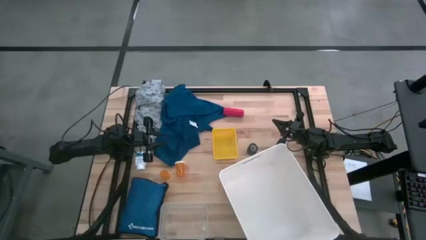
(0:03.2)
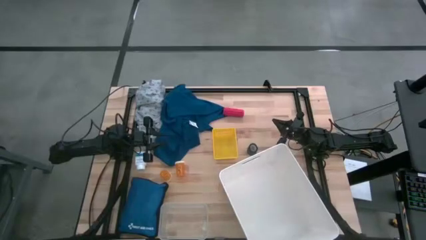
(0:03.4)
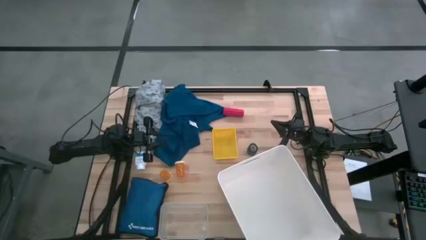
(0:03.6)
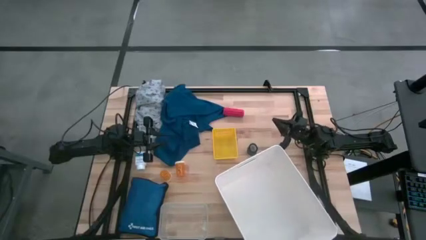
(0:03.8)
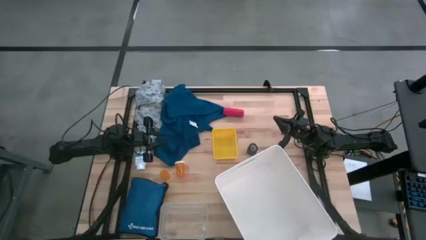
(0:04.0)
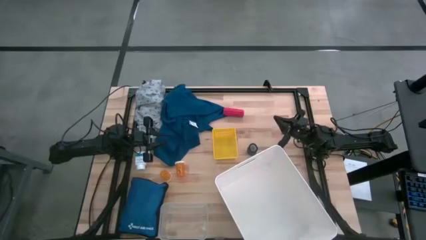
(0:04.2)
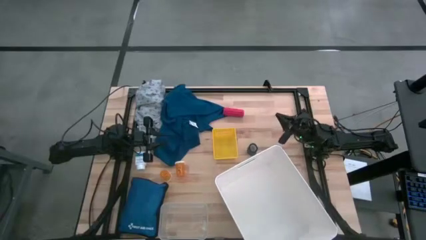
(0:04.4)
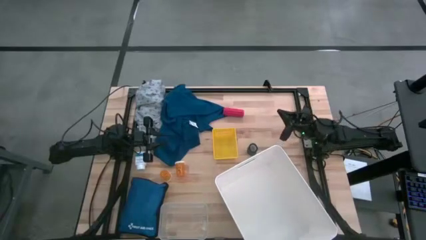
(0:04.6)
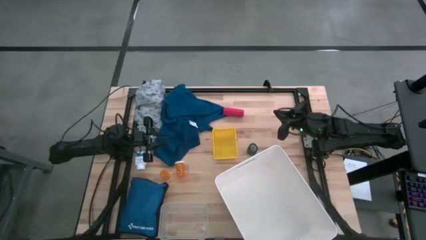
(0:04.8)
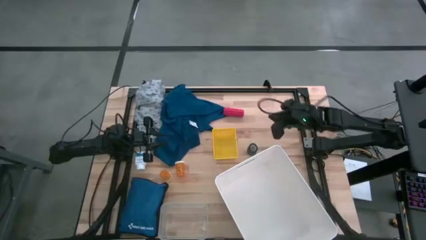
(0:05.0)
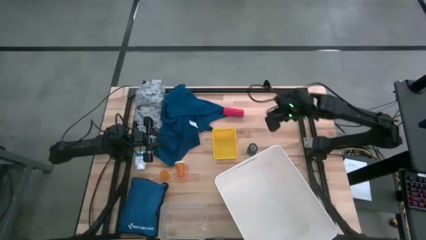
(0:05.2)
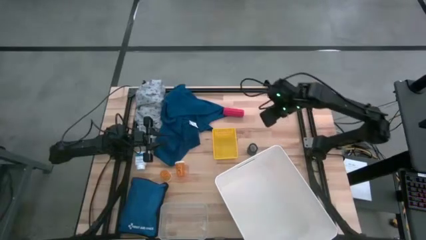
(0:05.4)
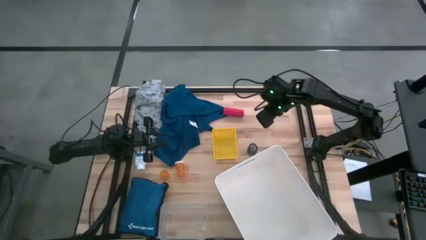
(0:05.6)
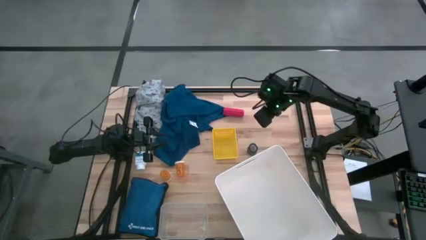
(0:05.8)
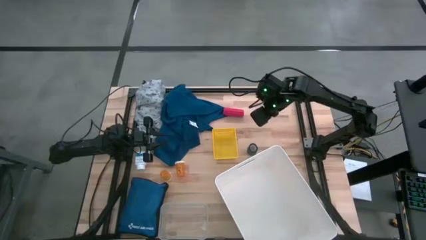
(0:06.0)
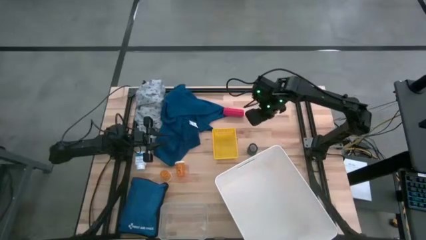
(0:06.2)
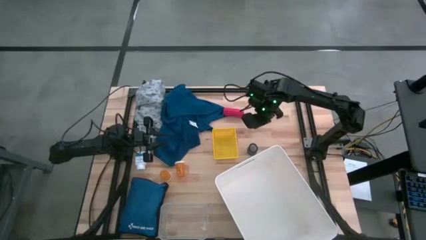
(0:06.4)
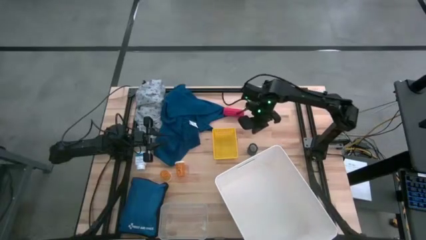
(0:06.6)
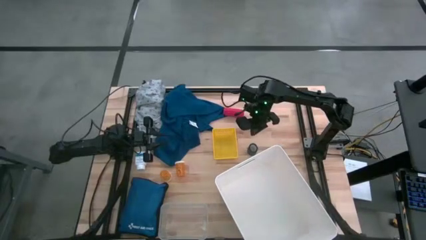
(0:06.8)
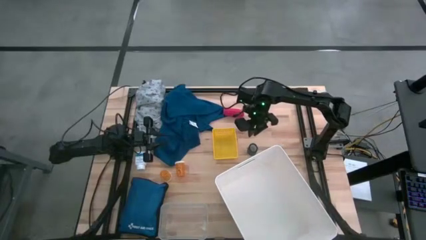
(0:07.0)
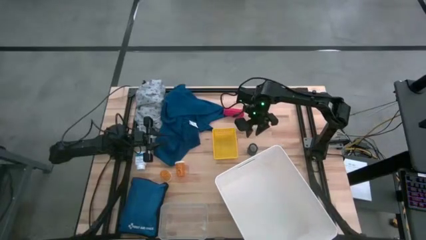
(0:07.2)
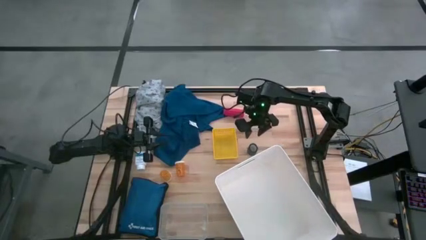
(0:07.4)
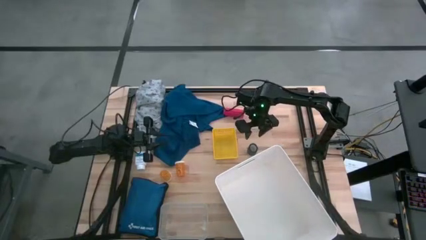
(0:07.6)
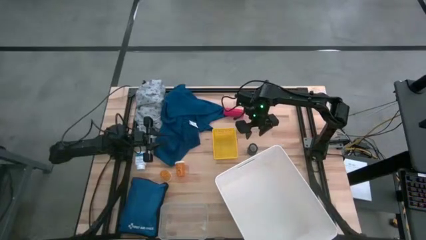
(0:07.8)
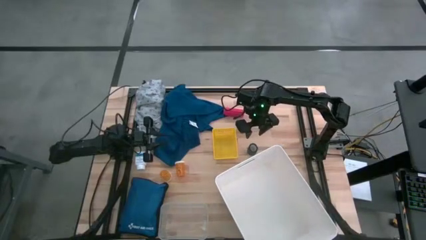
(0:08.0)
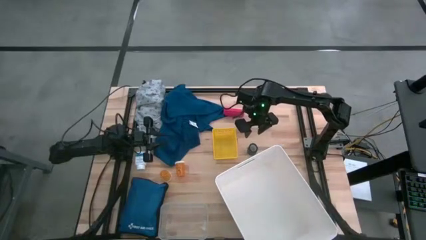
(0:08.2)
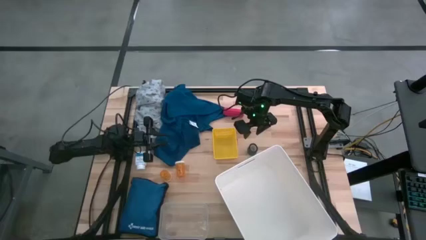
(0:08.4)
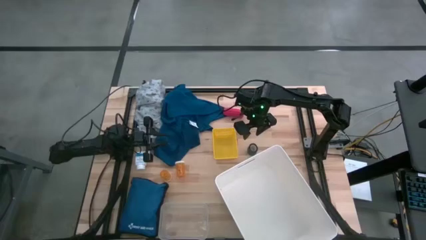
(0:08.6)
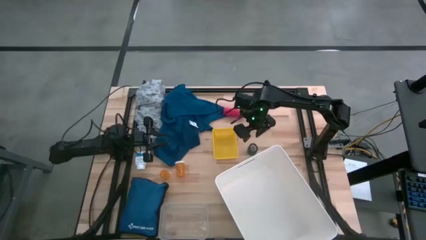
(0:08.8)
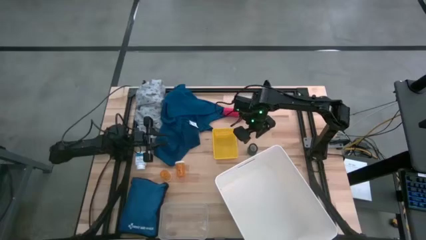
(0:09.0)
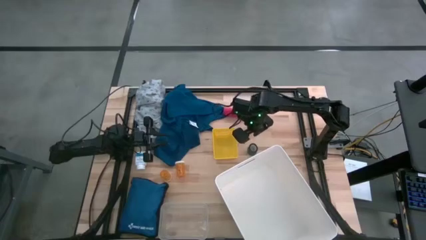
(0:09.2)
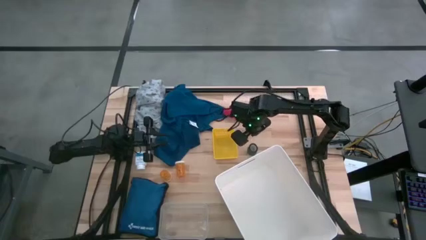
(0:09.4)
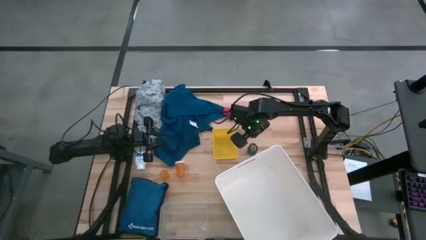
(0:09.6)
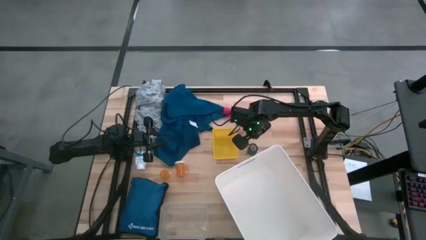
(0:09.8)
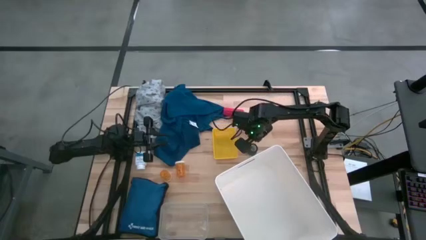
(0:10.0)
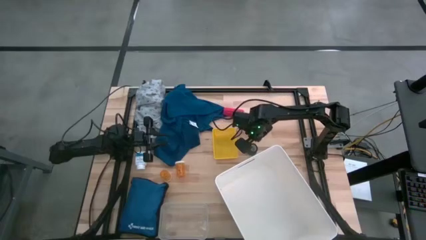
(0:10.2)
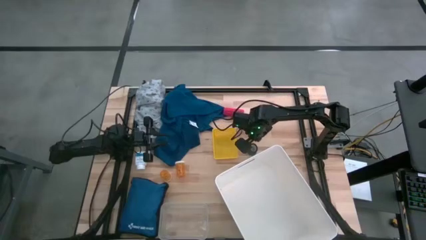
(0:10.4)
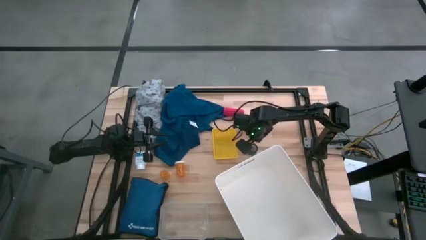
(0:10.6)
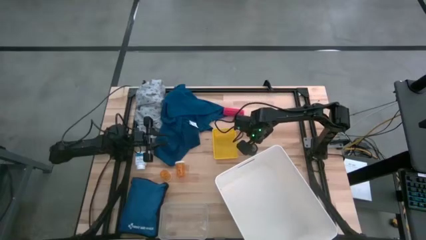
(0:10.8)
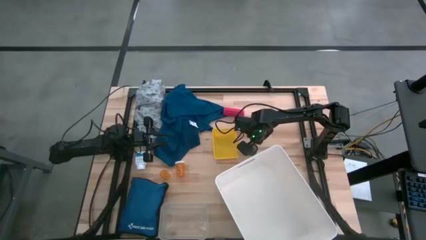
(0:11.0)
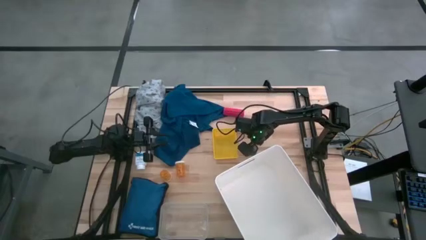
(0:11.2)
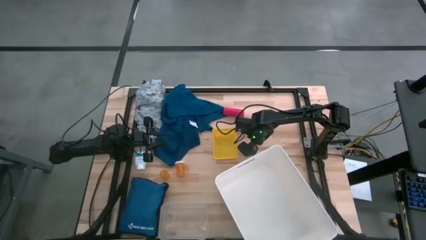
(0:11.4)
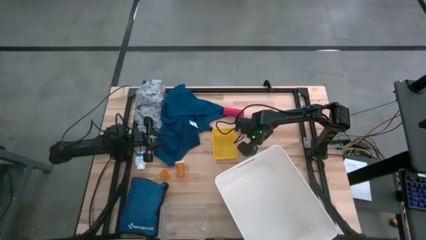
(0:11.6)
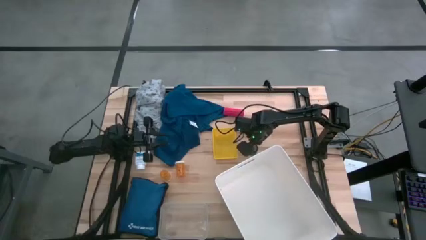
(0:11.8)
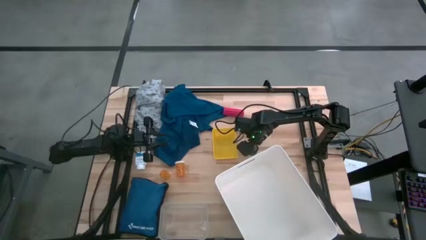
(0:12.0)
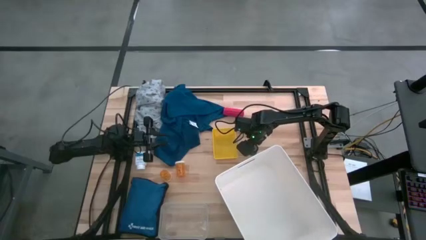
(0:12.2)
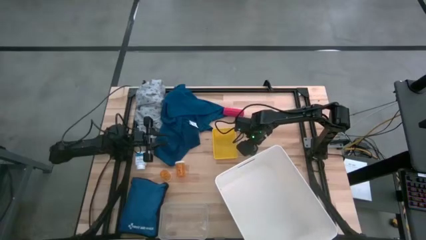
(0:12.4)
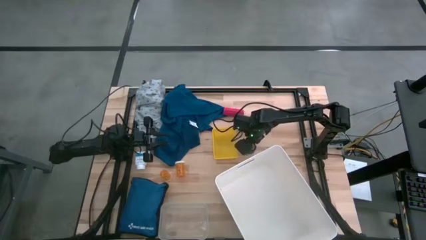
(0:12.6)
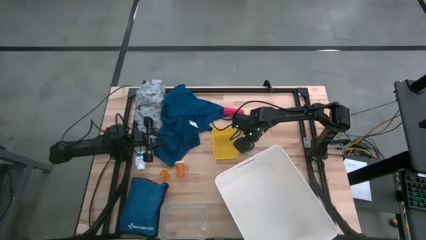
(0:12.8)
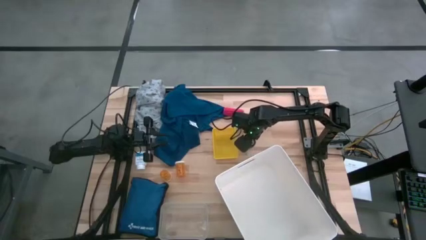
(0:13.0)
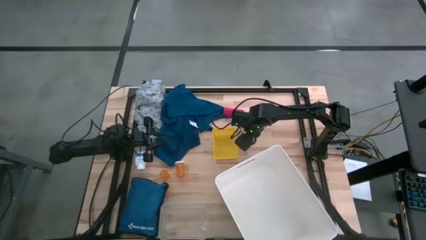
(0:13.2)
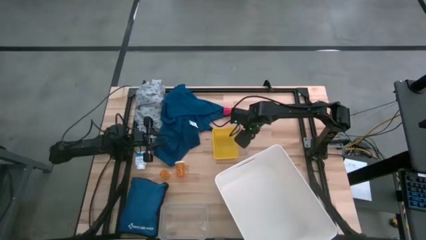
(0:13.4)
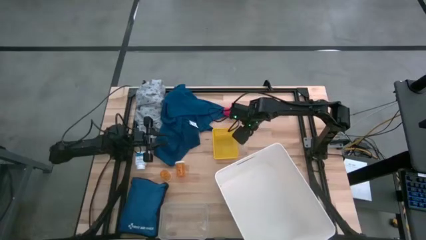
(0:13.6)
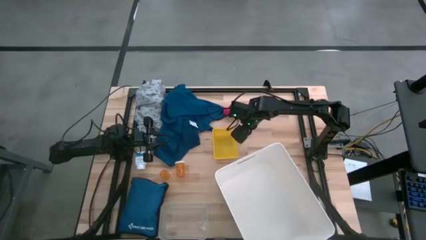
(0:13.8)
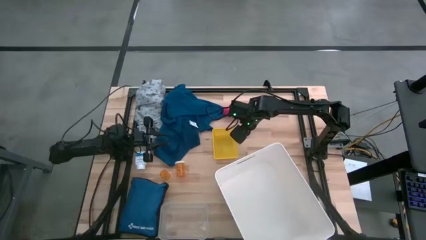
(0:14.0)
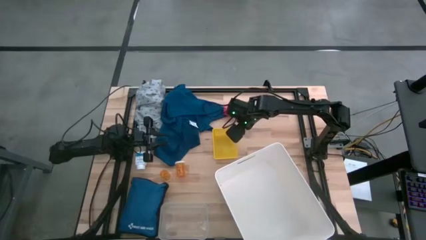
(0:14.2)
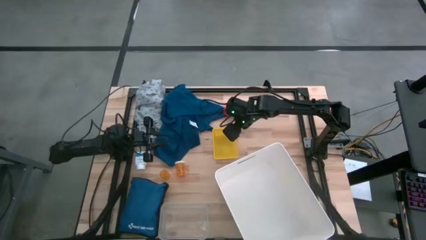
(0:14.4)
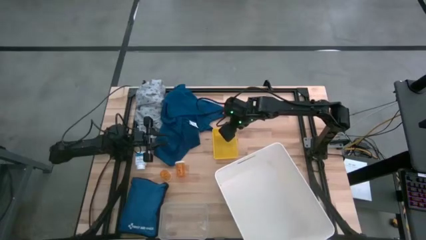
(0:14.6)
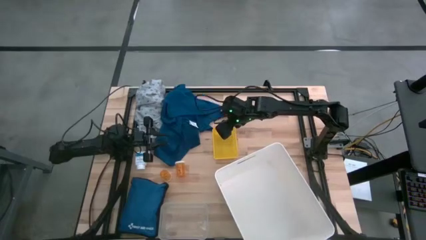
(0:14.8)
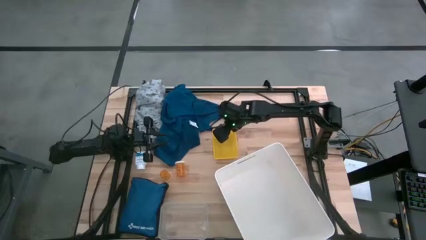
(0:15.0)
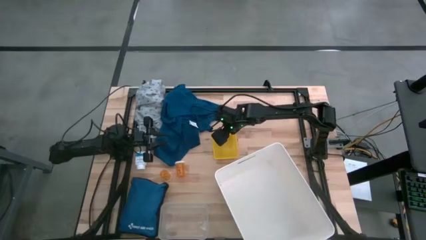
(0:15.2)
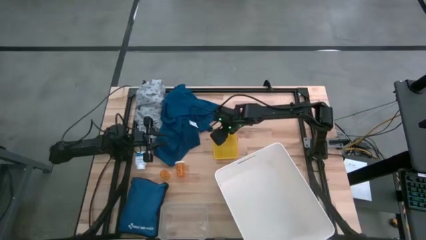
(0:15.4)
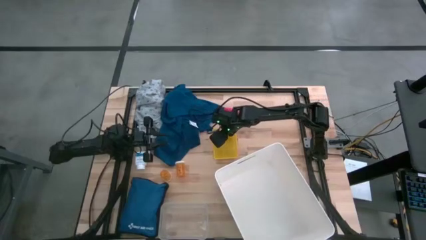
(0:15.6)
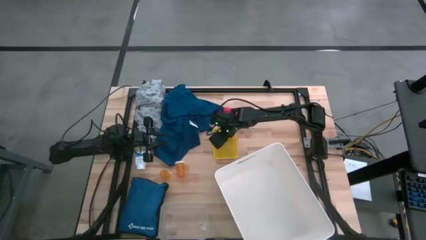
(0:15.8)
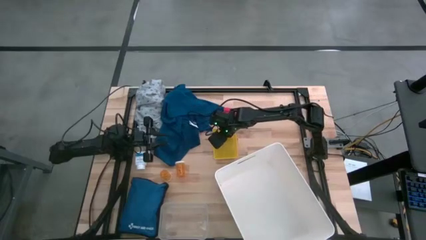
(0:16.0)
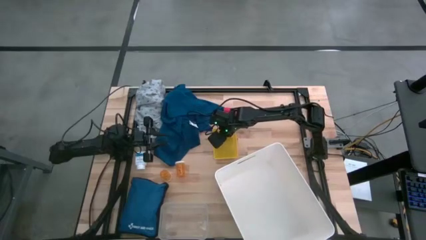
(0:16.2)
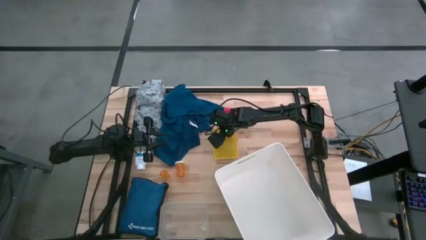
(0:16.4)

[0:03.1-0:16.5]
Task: Pick & place medical supplies in basket/bin
Put the black bandage into the yellow bin

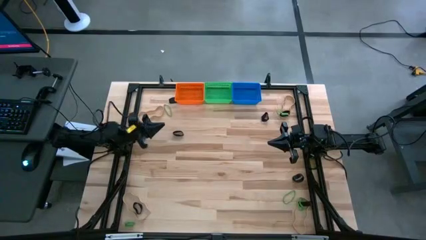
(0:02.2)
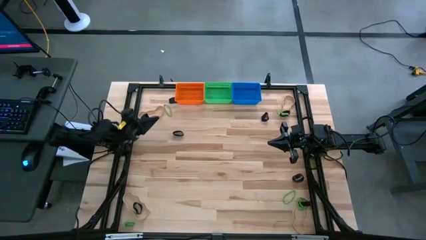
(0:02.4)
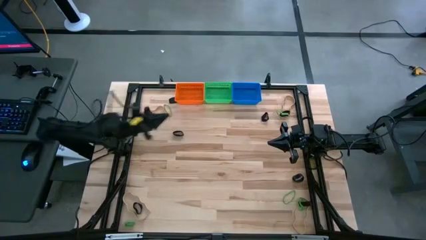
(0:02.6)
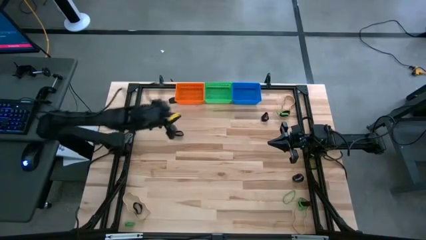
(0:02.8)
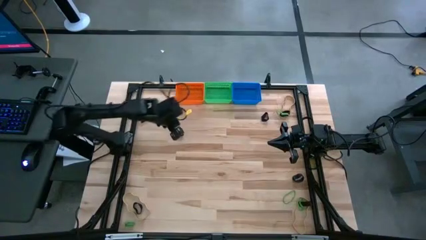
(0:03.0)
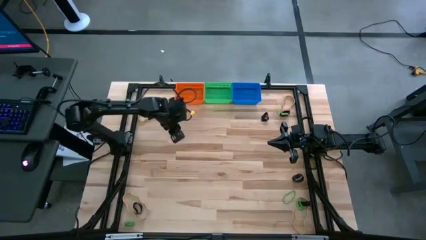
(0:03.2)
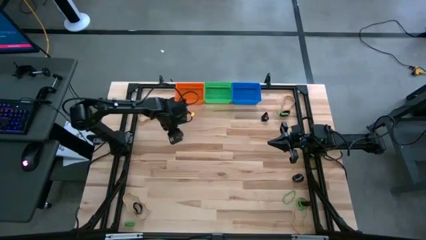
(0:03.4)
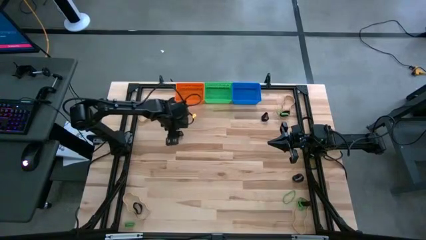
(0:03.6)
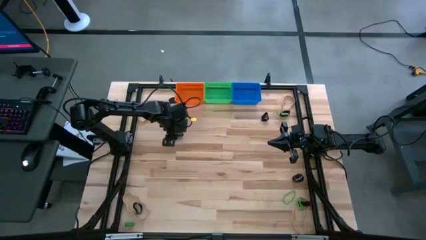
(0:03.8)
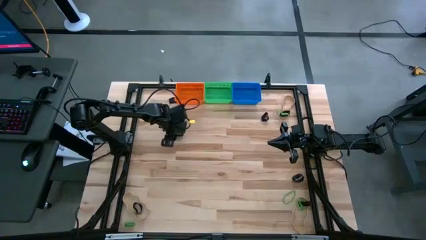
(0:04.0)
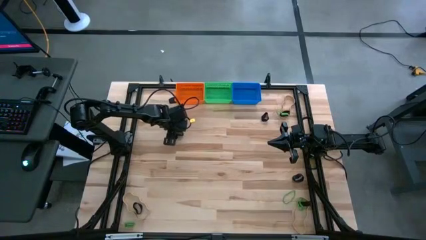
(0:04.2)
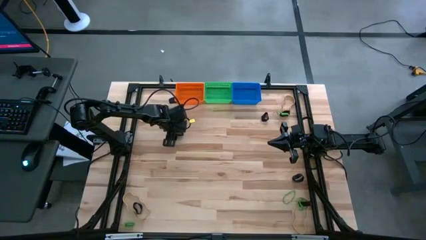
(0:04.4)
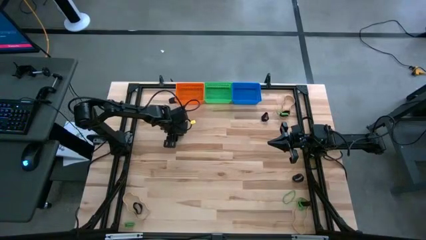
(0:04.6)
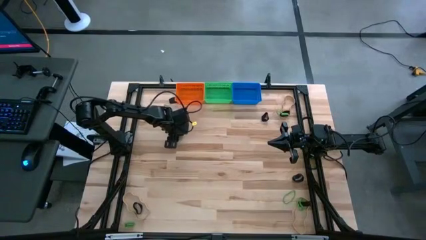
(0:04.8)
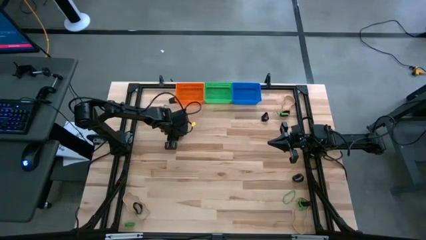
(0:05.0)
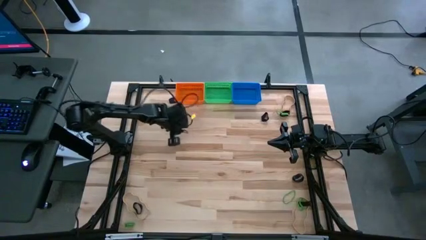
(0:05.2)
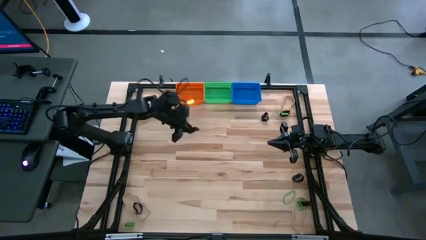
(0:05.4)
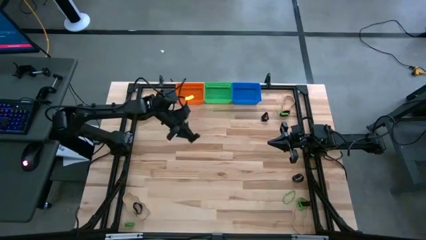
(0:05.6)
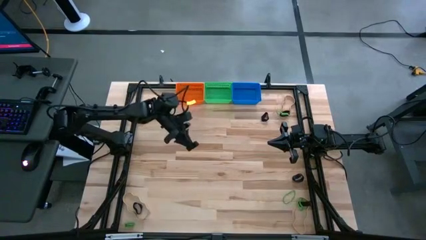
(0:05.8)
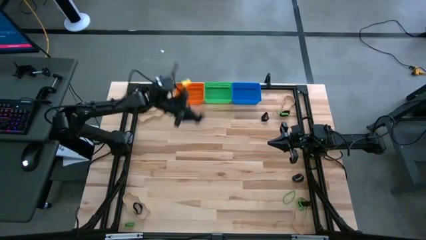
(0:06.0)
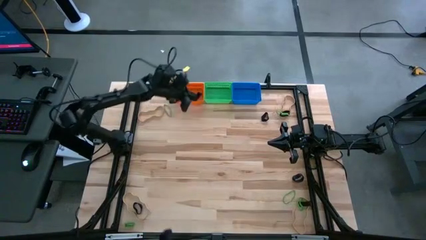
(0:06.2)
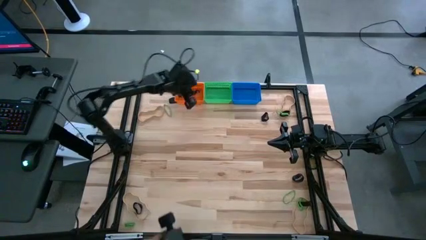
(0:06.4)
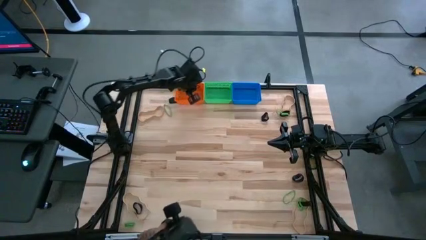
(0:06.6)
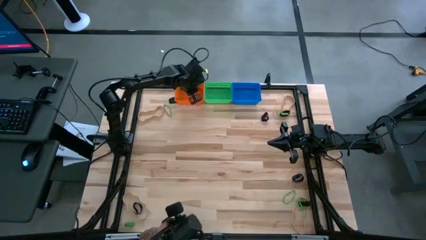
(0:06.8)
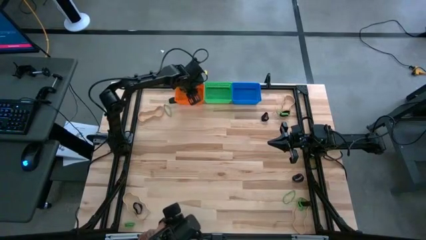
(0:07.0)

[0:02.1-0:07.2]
Task: Sort rubber bands into baskets
Put the black rubber band into the orange basket
